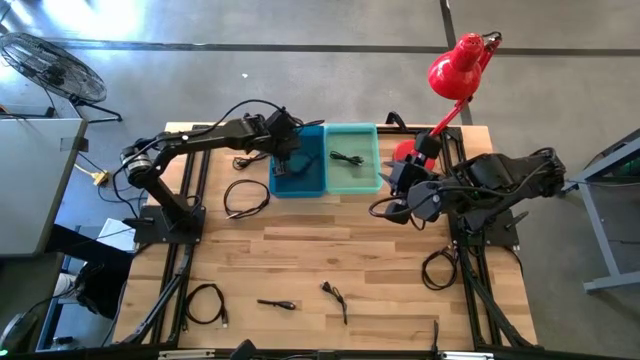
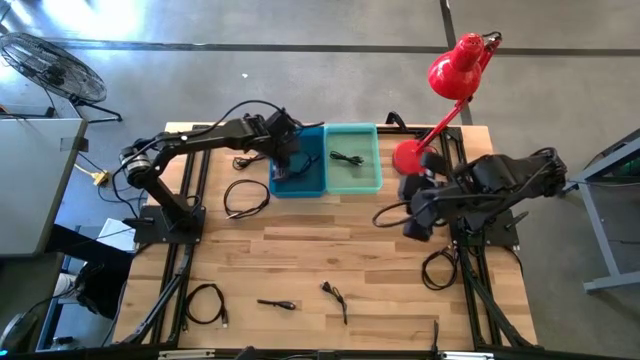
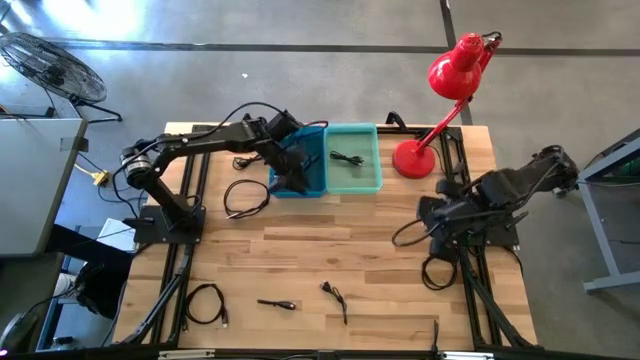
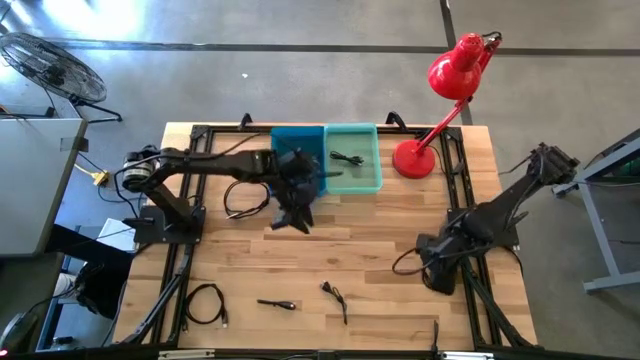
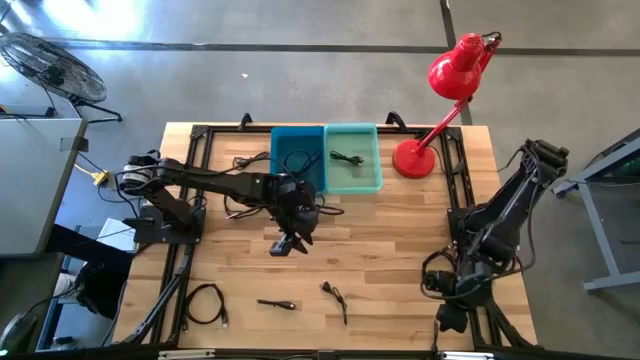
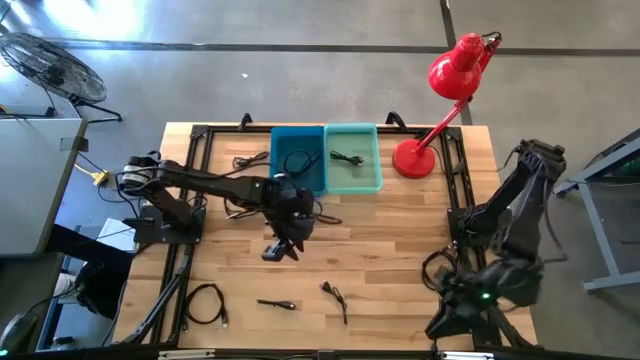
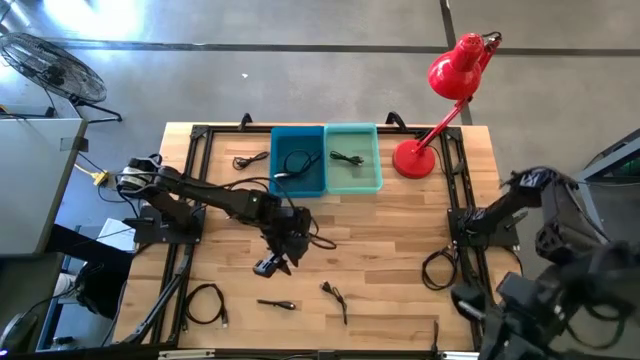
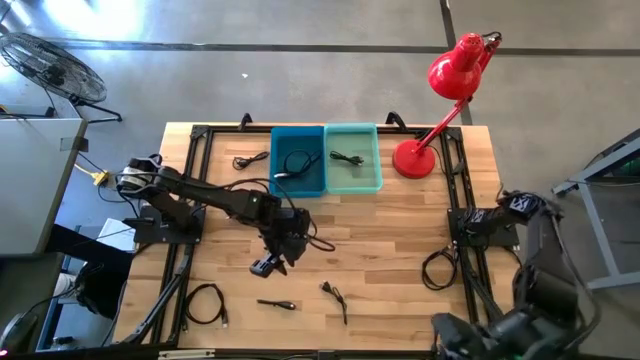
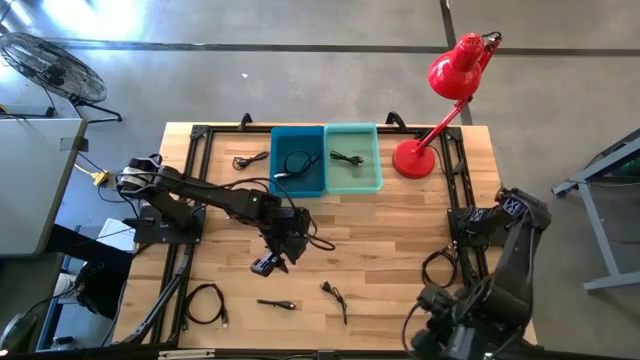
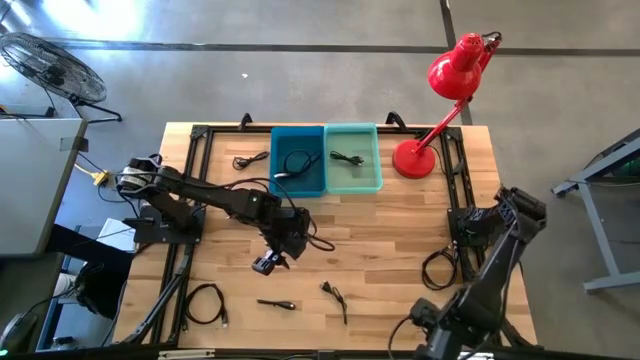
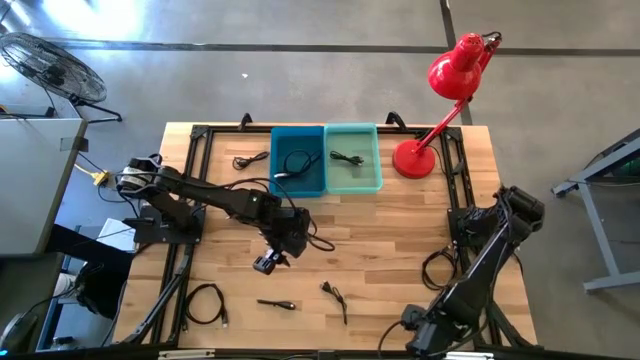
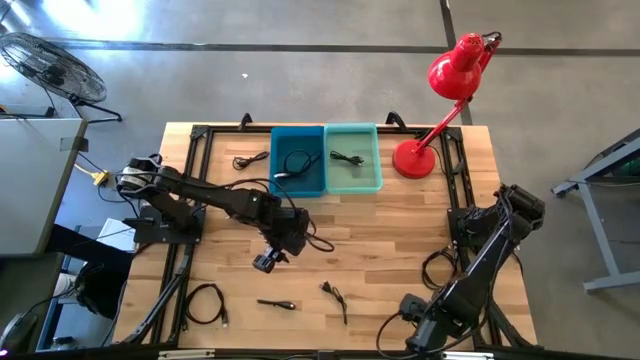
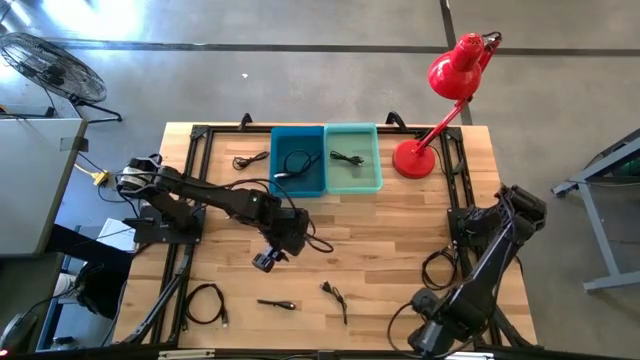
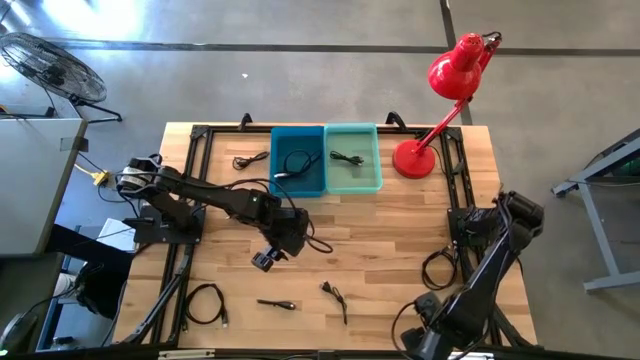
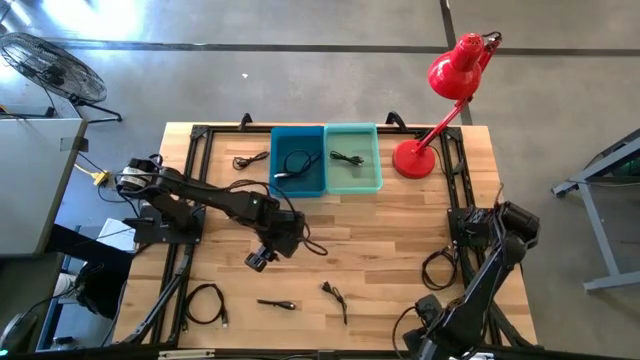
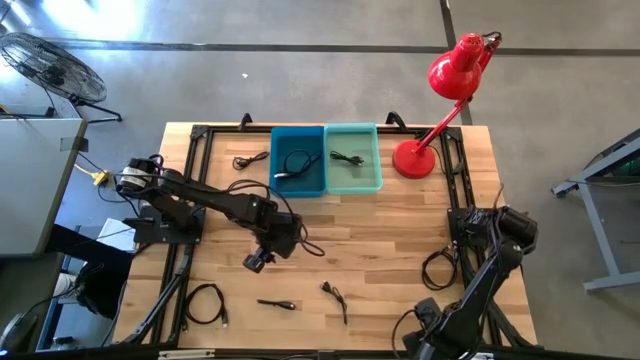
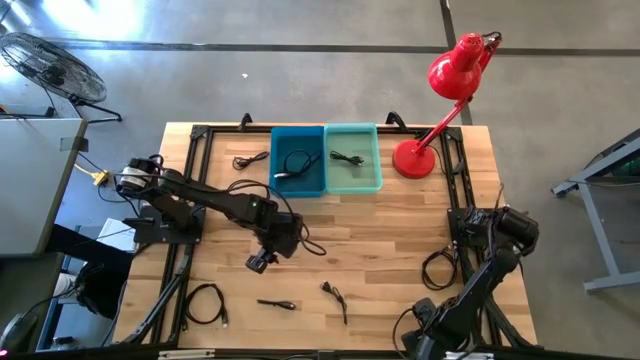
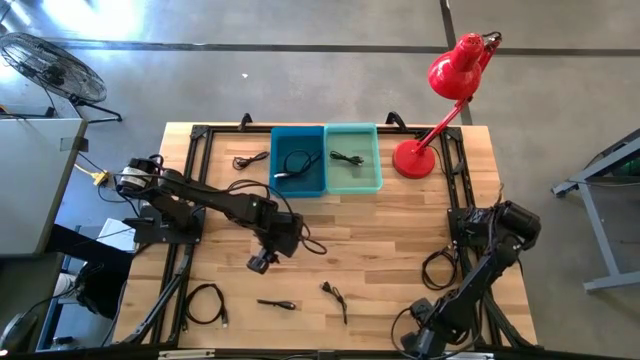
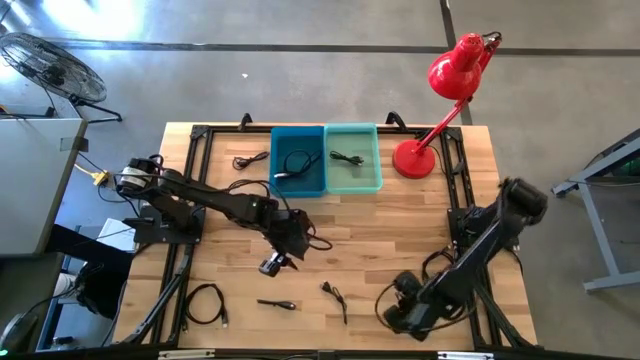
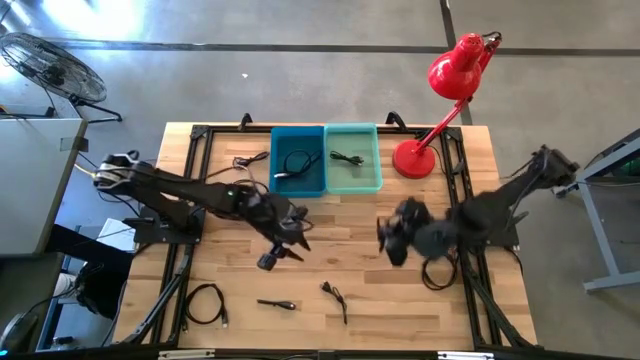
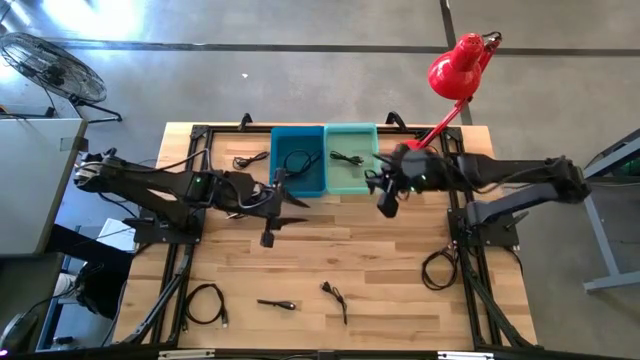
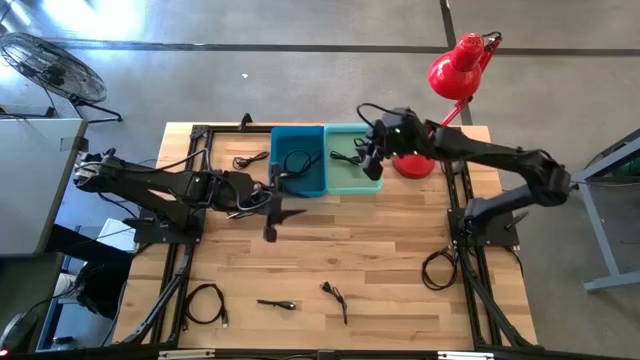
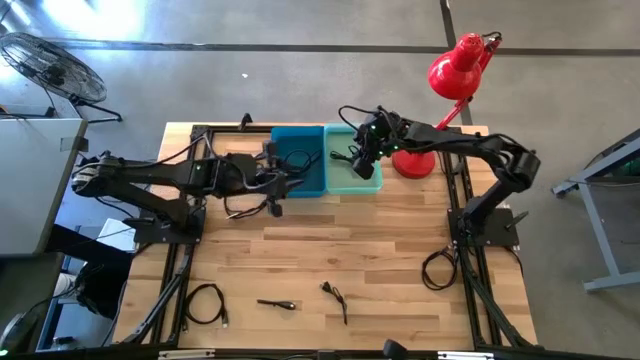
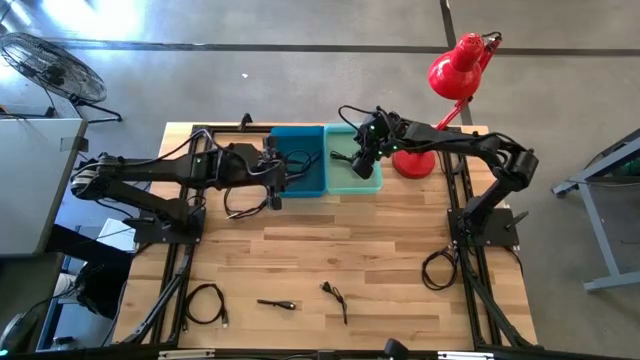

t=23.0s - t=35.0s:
Task: Pick & Place USB Port
Put the black USB cable into the green bin

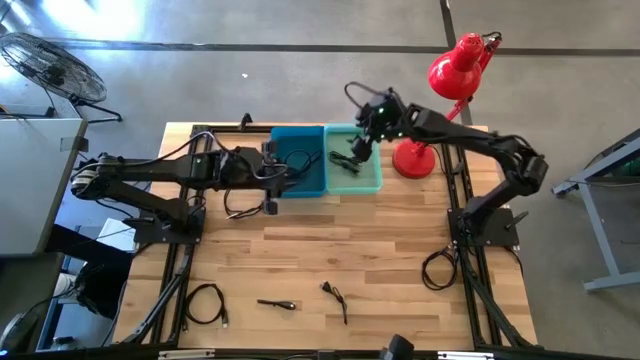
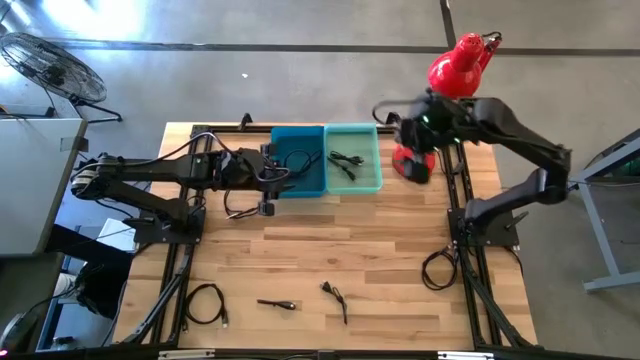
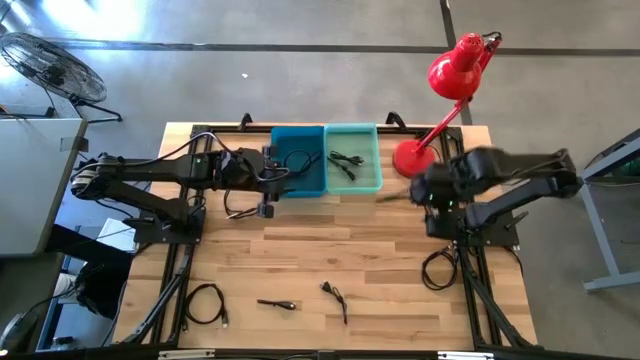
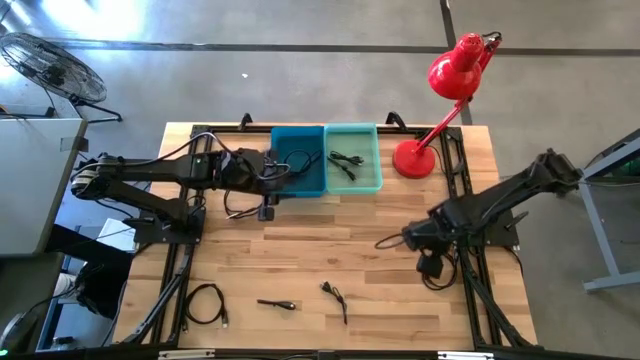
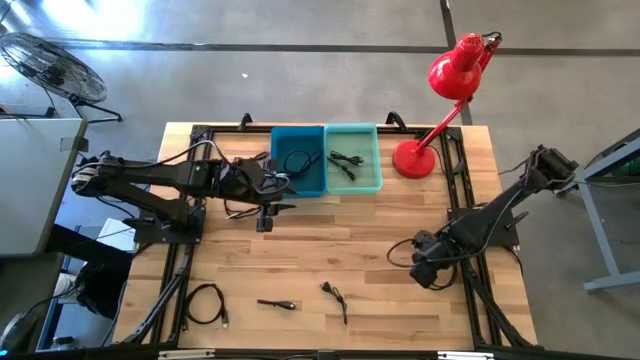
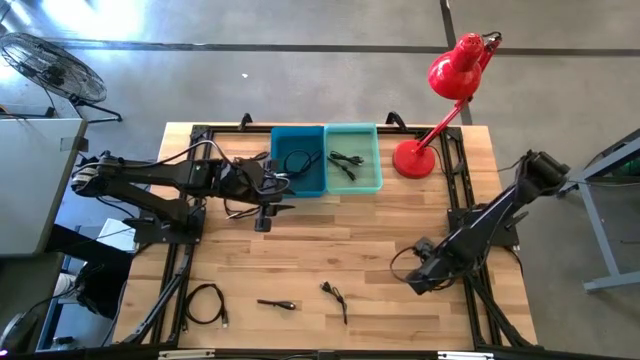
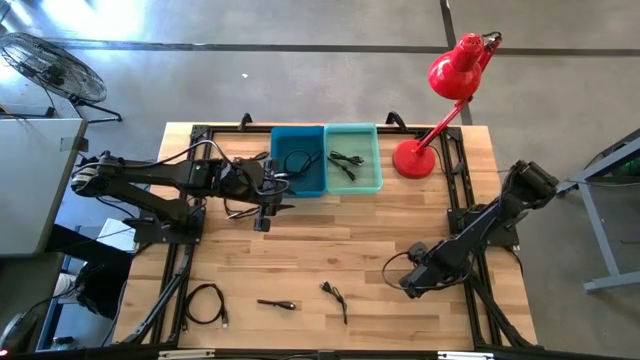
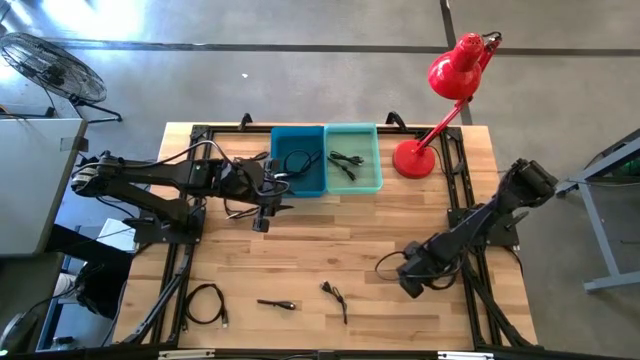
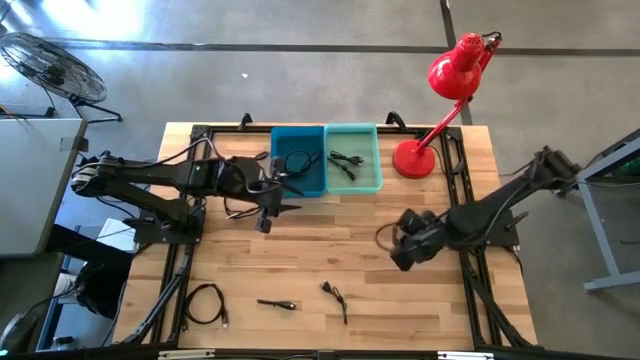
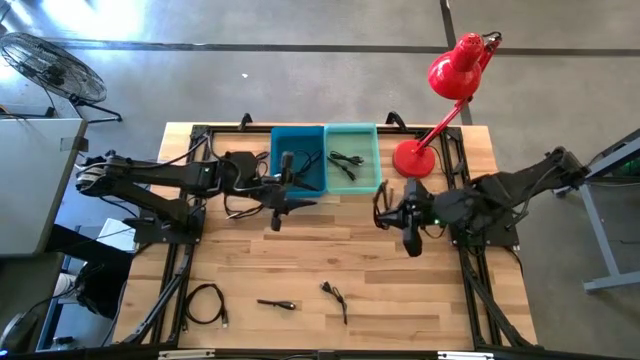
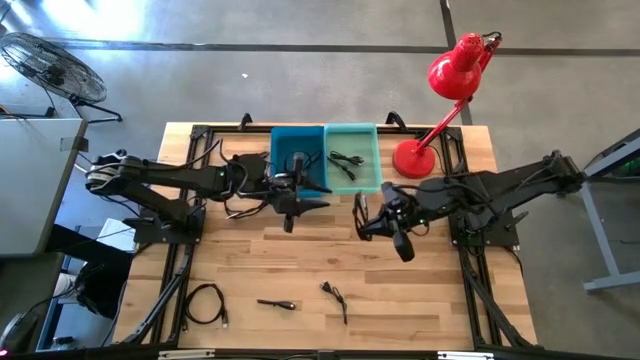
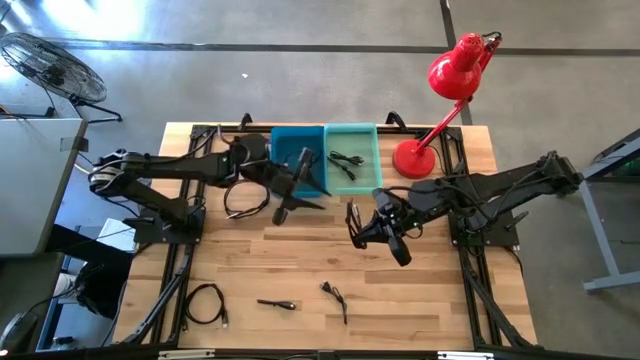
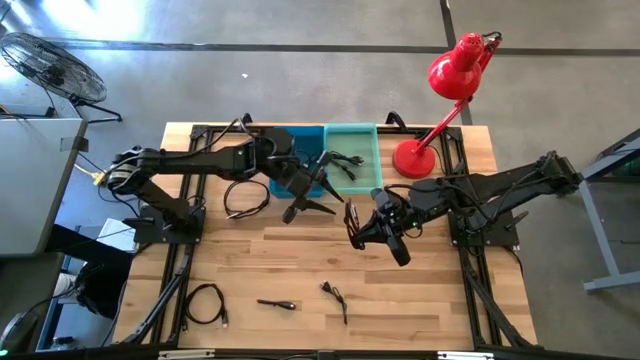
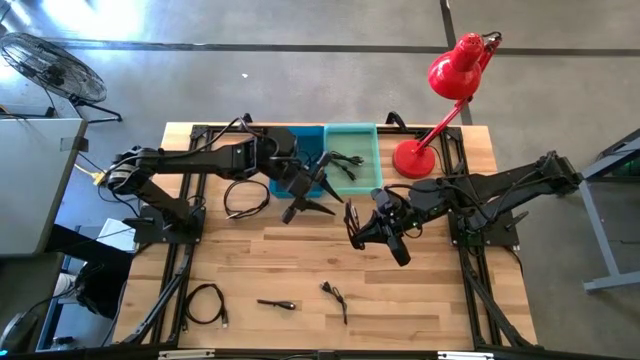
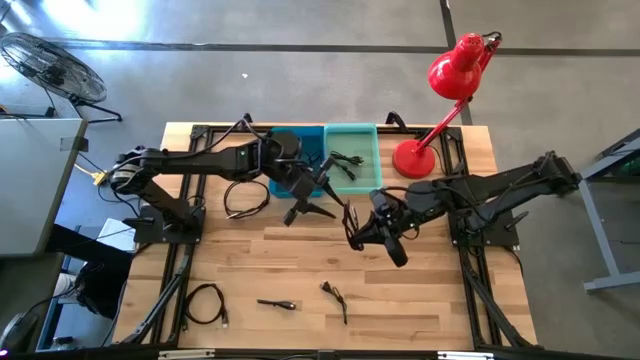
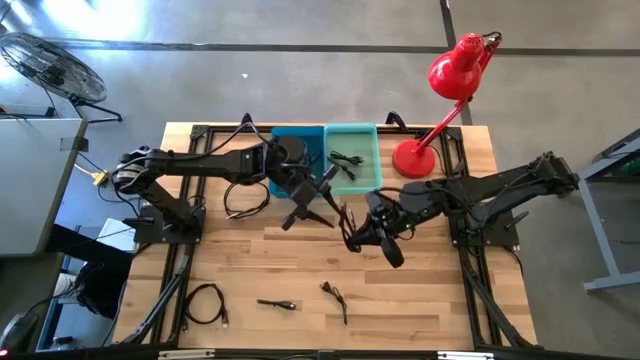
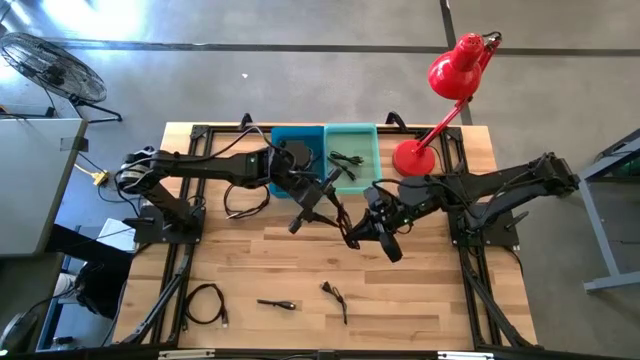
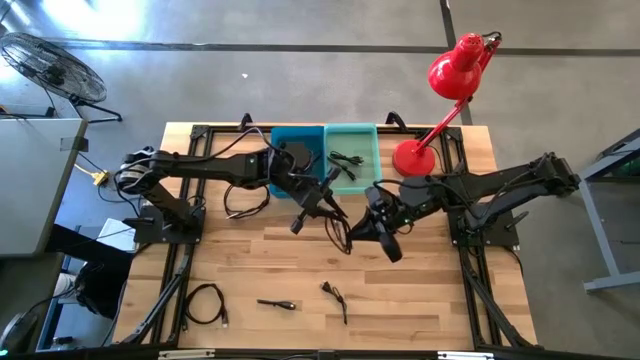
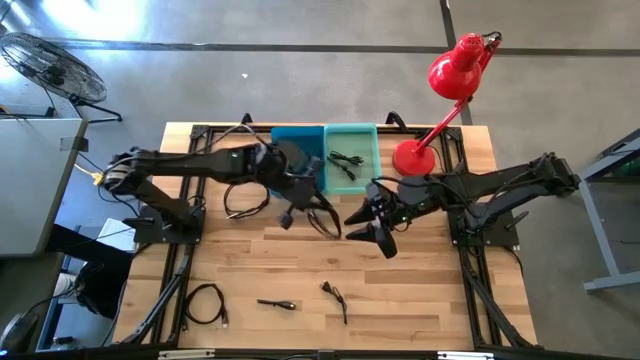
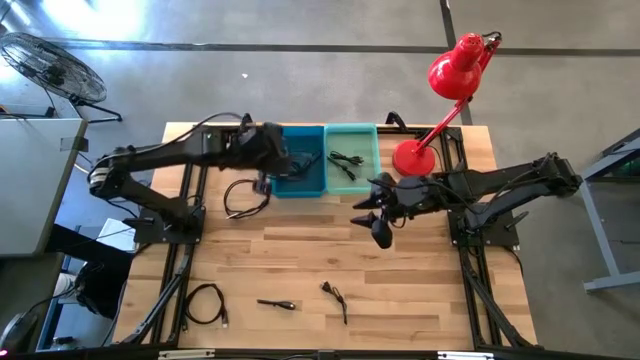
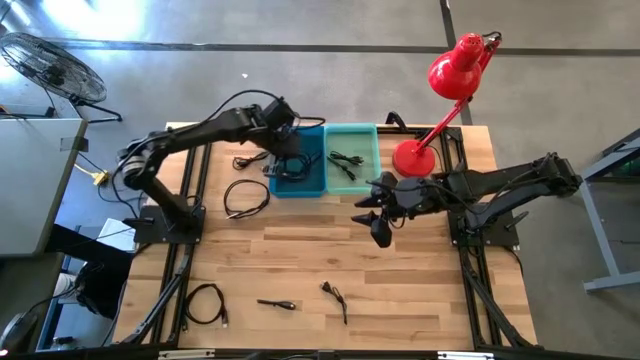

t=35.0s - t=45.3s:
Put the black HDMI cable into the blue bin
